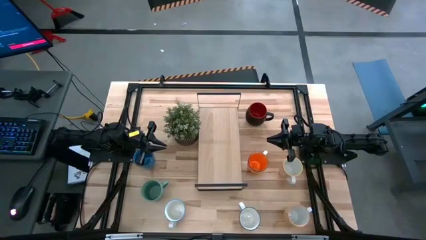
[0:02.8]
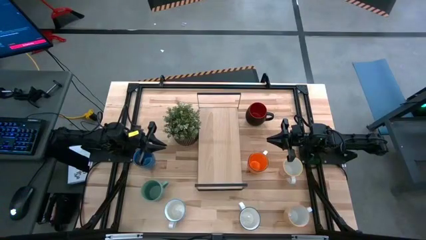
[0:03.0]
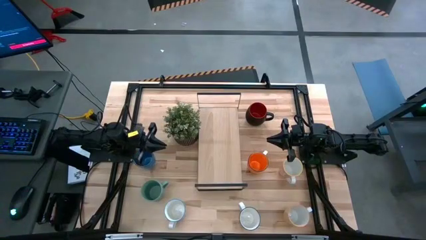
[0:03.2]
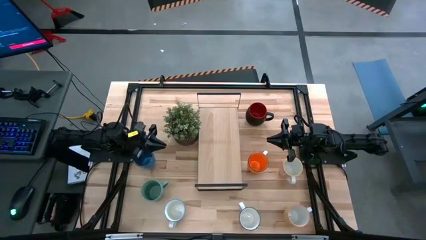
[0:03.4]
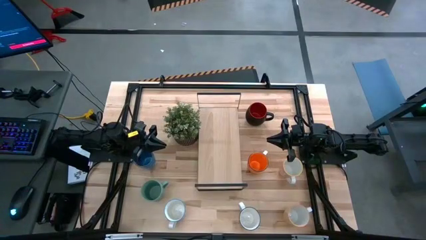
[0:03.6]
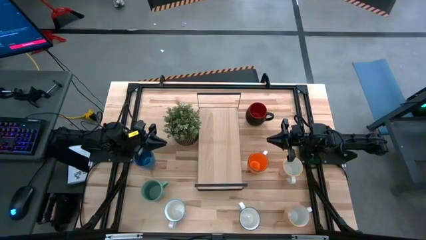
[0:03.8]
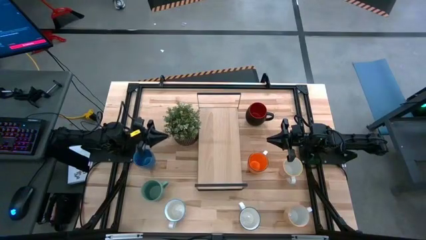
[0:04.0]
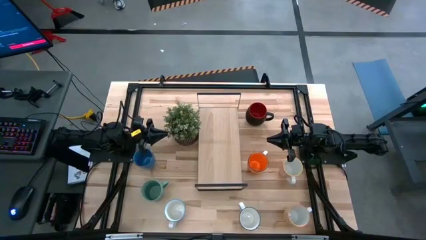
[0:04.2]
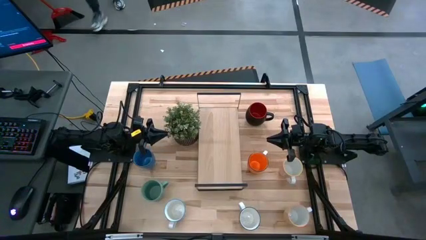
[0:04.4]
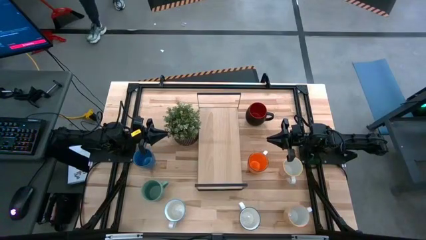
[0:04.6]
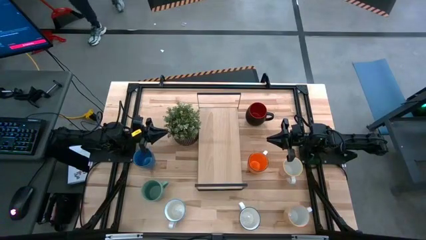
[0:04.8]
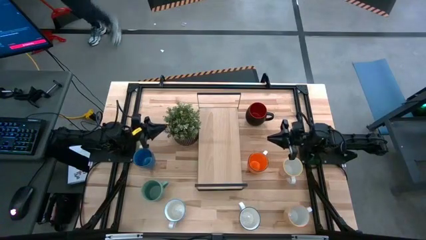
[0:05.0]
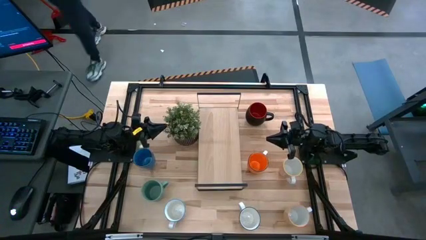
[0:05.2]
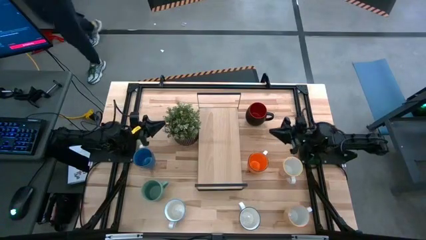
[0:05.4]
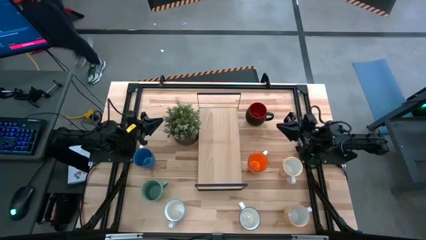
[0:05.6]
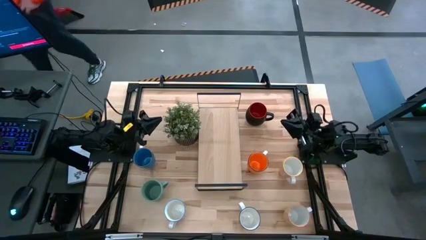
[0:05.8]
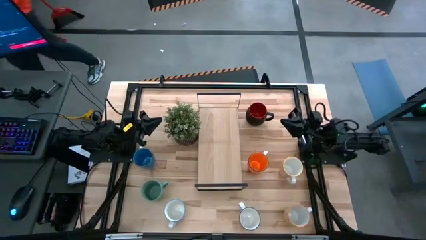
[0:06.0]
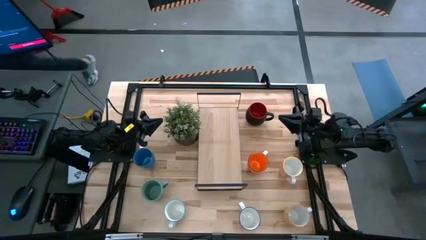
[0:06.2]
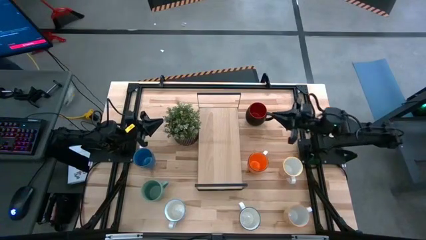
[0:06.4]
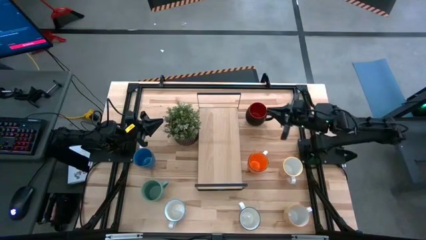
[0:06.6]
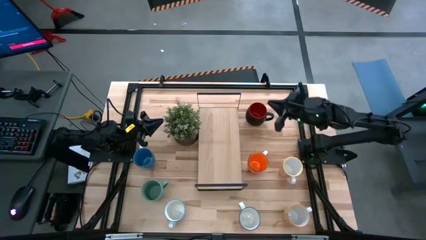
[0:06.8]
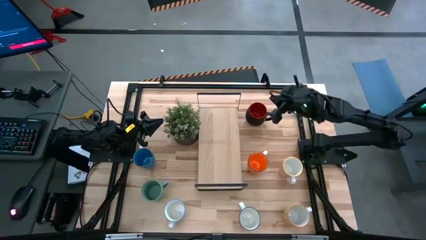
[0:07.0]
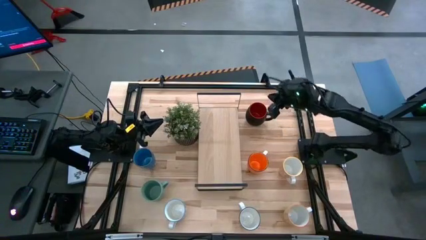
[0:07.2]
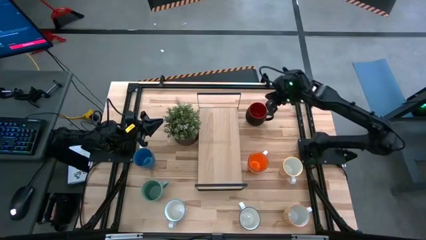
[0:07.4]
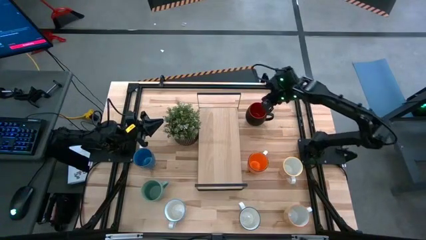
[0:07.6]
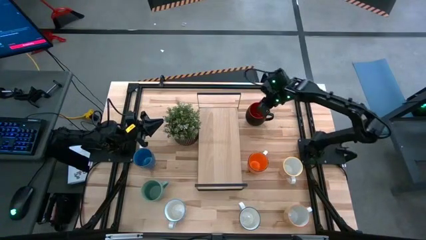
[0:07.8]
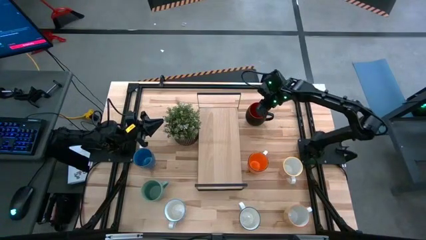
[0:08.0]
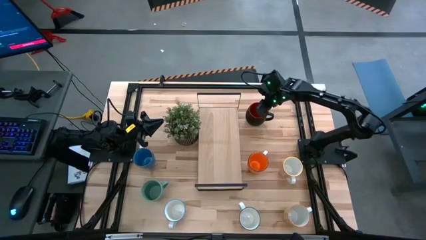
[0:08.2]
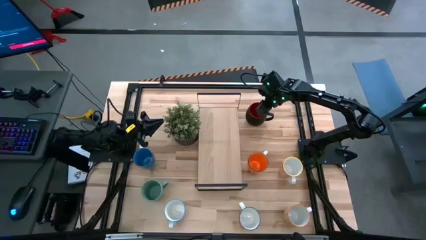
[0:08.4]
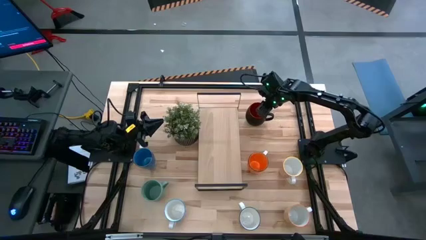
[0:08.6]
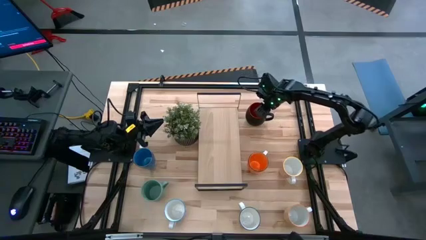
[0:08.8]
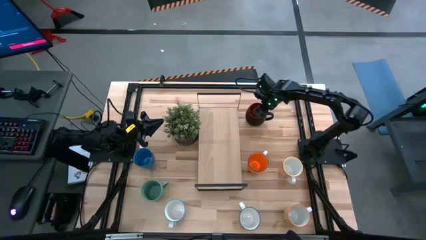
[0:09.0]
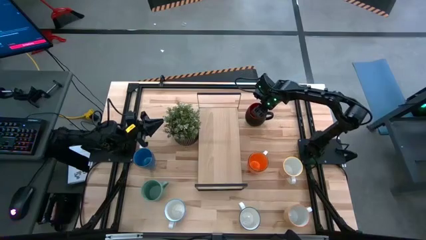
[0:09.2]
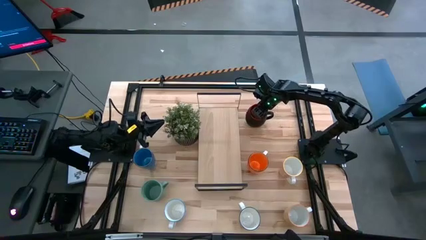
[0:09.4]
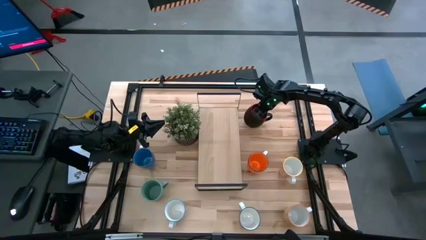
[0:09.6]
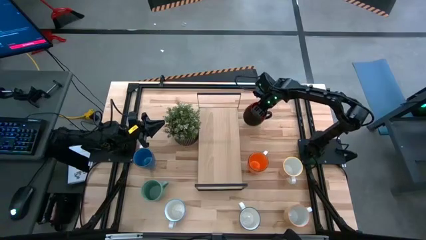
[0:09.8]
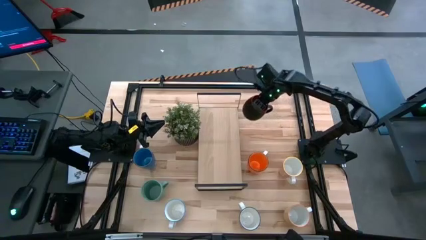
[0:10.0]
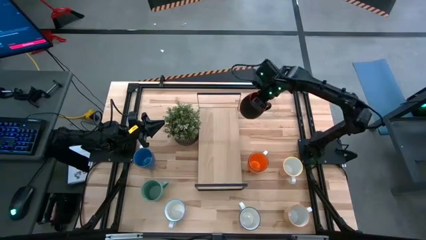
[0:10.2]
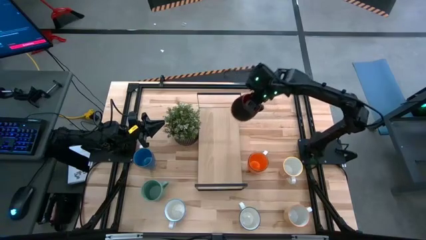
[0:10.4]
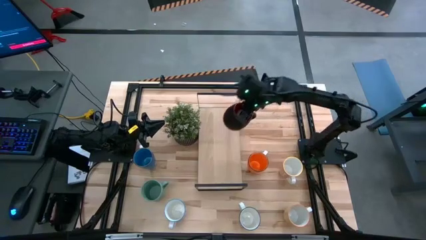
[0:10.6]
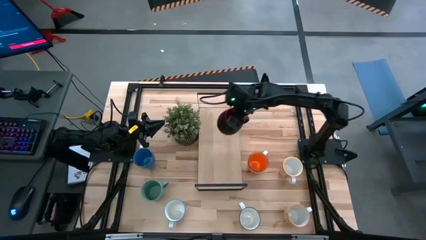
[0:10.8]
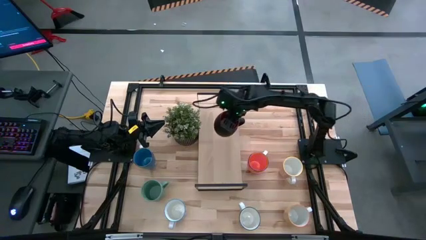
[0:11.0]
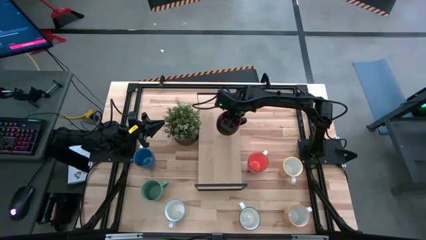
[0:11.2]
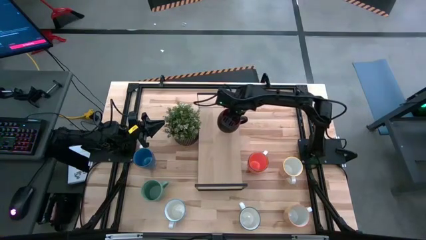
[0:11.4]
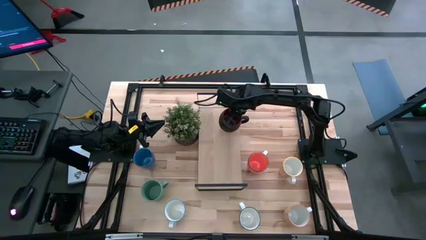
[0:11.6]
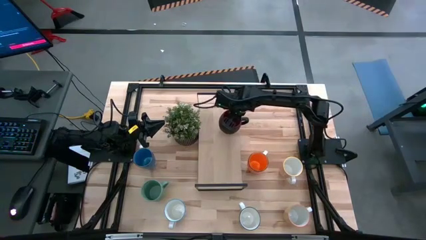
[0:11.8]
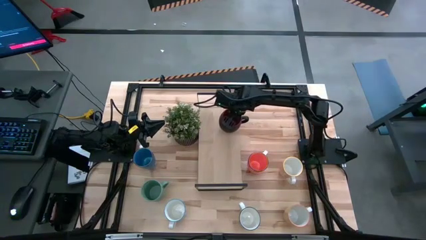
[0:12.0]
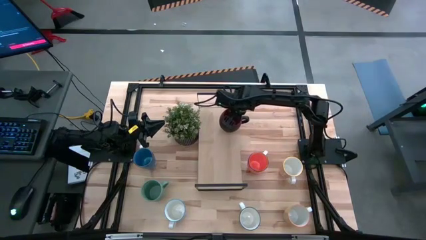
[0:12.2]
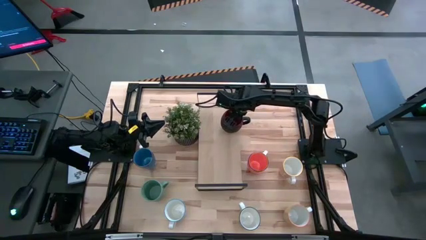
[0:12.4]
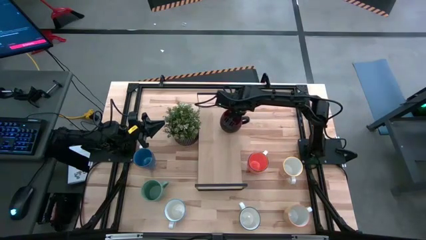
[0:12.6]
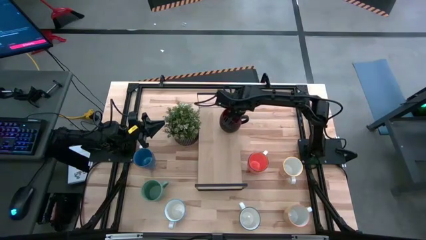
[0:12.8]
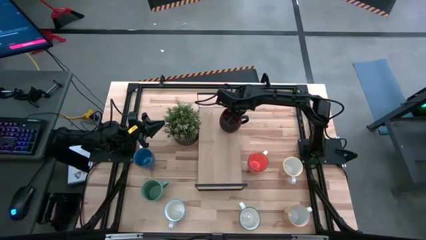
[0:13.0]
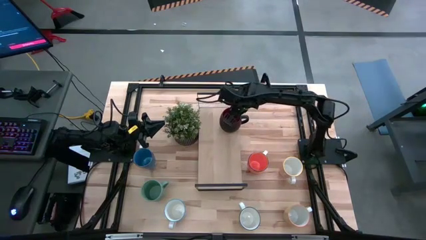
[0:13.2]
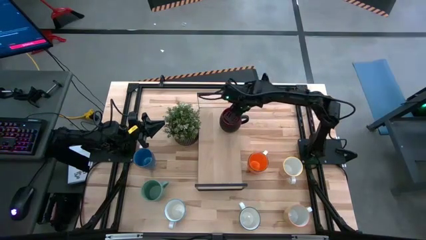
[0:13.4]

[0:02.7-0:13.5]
Task: Place coffee mugs
Put the black mug on the shelf

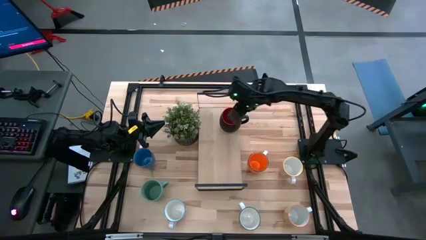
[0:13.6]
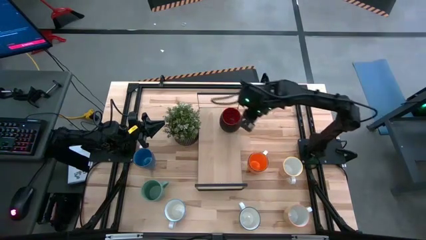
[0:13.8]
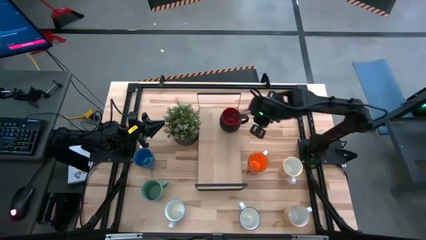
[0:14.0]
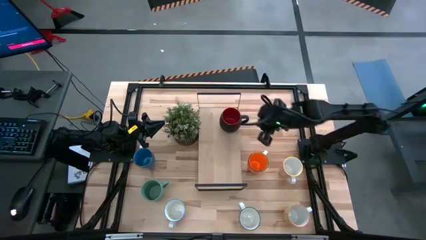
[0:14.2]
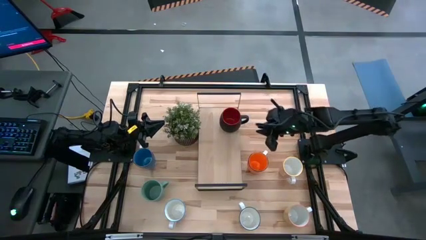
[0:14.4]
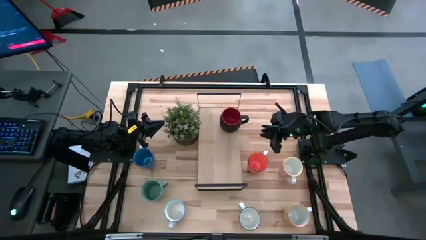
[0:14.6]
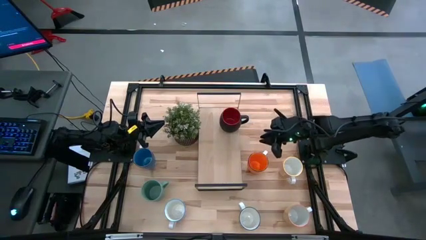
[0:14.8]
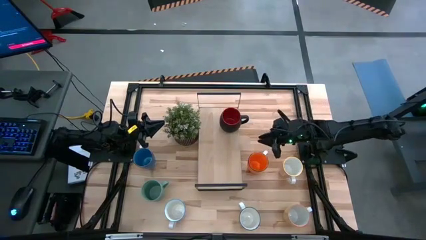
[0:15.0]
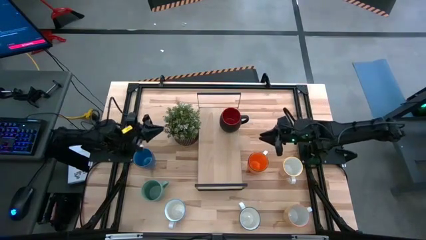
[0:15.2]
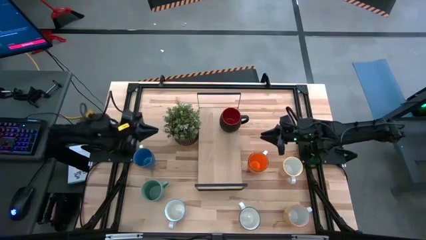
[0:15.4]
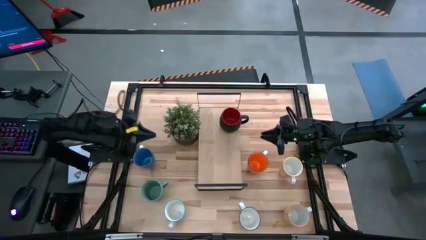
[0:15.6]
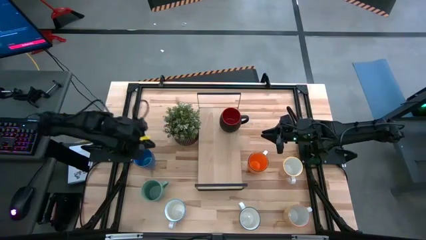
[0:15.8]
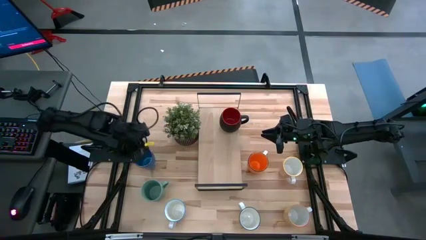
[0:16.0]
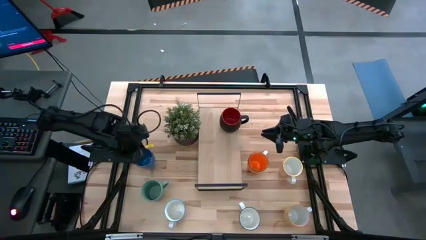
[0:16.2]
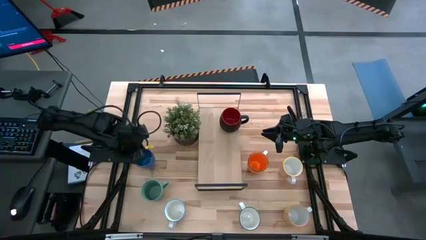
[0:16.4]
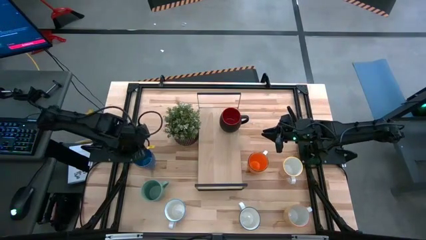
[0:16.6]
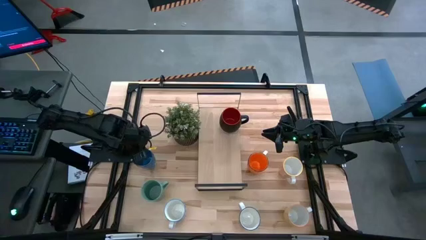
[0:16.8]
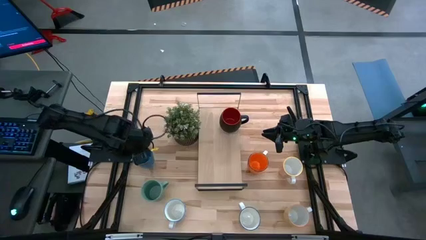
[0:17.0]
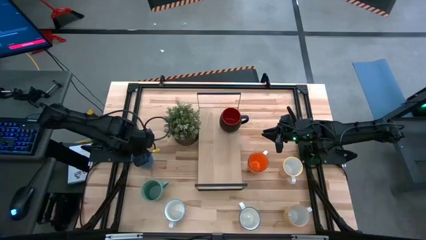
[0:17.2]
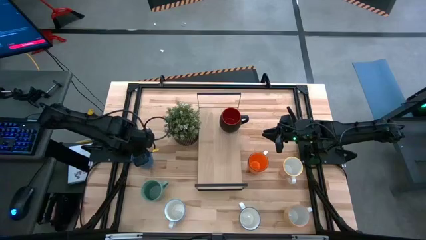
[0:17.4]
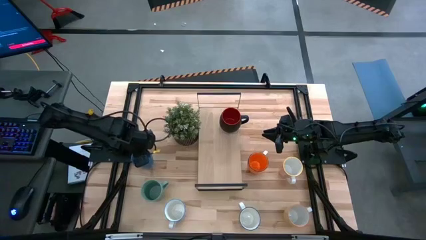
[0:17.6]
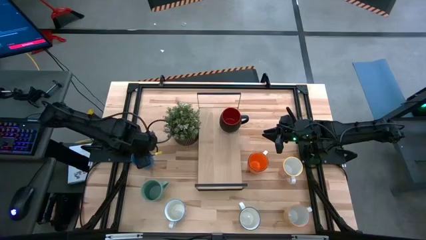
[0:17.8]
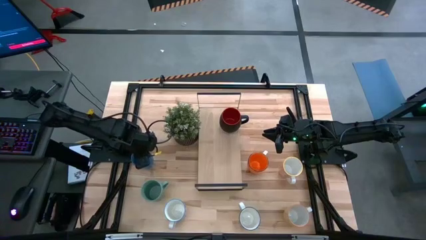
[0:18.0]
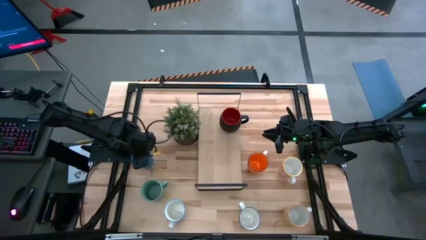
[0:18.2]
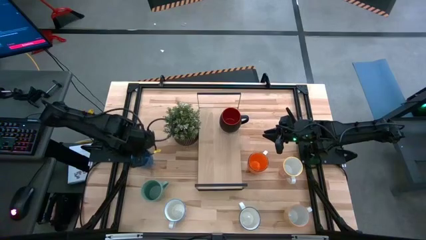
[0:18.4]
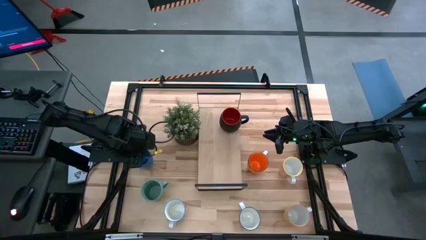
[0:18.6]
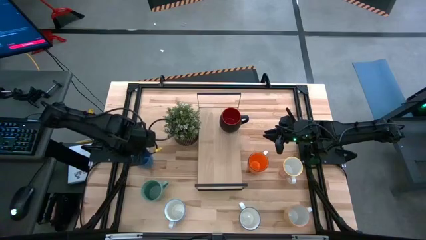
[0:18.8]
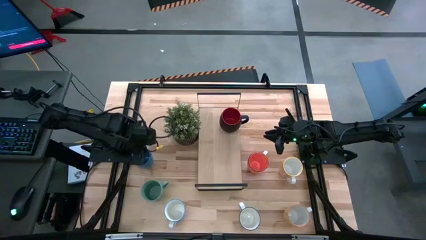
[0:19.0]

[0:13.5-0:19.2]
Put the blue mug on the shelf
